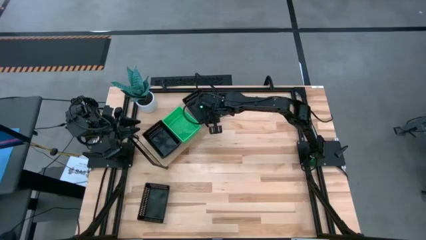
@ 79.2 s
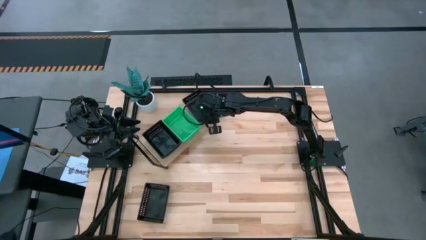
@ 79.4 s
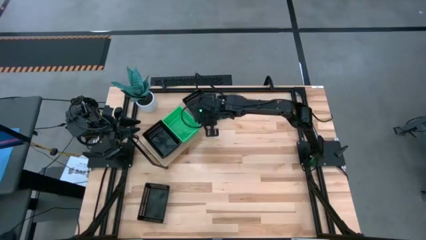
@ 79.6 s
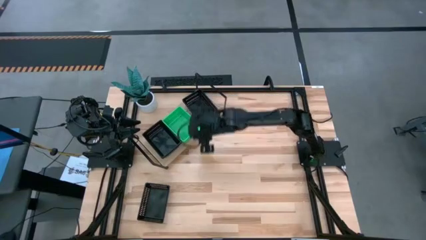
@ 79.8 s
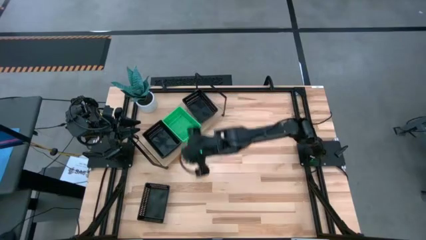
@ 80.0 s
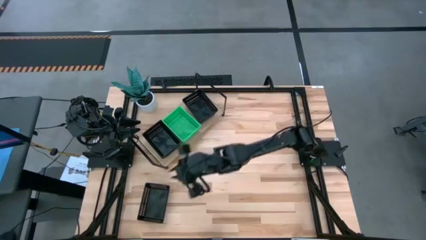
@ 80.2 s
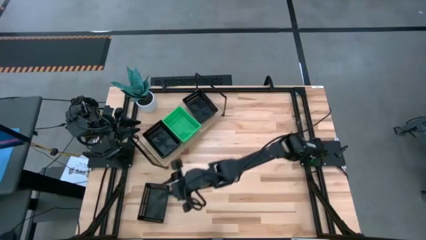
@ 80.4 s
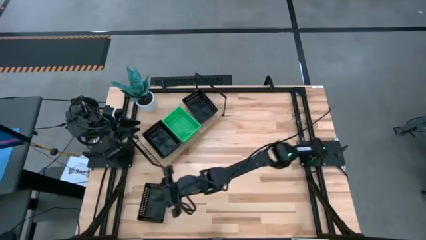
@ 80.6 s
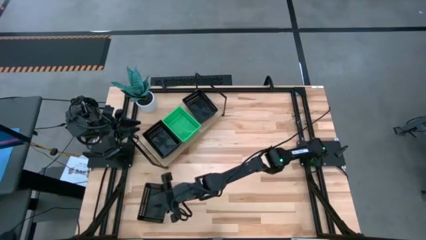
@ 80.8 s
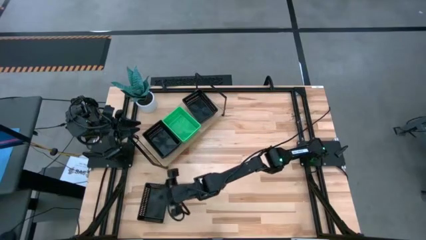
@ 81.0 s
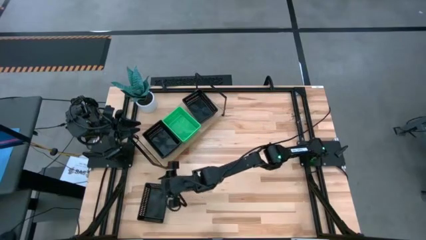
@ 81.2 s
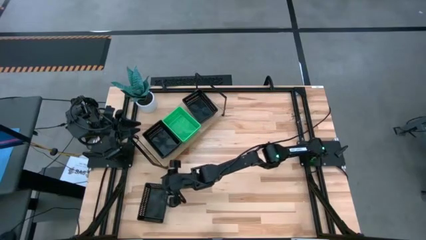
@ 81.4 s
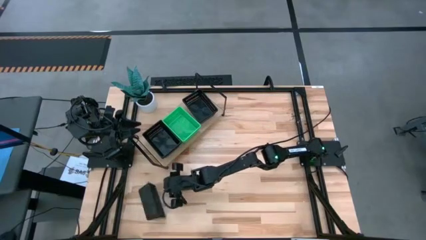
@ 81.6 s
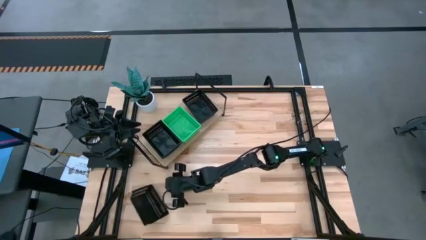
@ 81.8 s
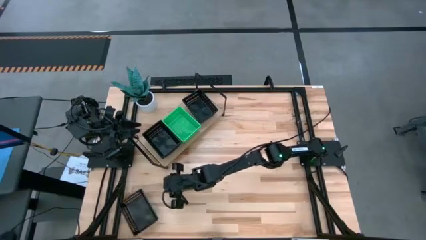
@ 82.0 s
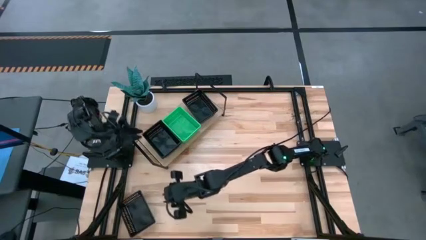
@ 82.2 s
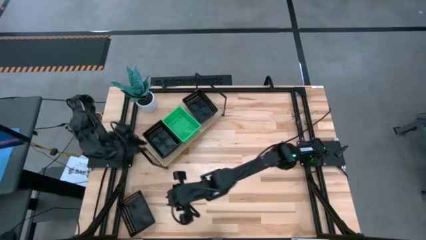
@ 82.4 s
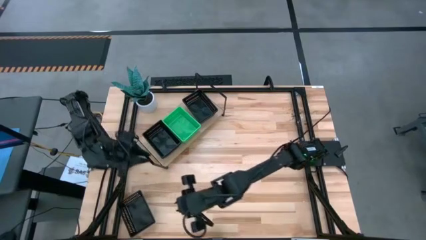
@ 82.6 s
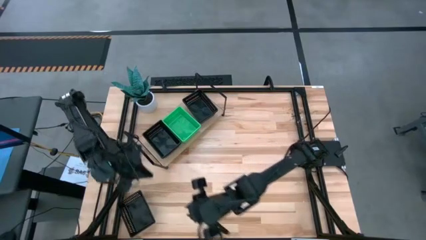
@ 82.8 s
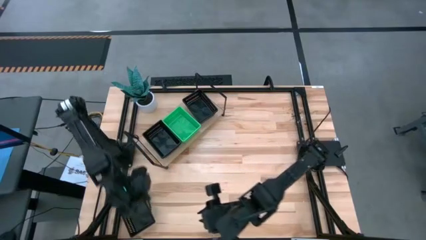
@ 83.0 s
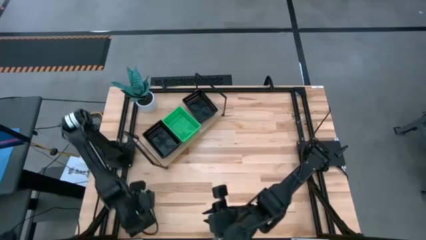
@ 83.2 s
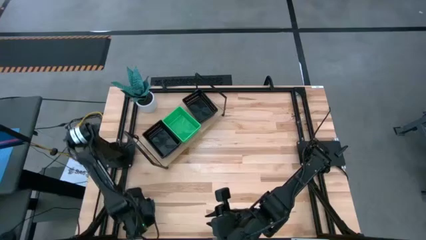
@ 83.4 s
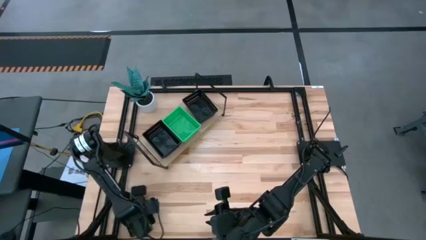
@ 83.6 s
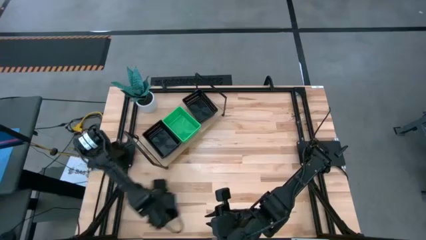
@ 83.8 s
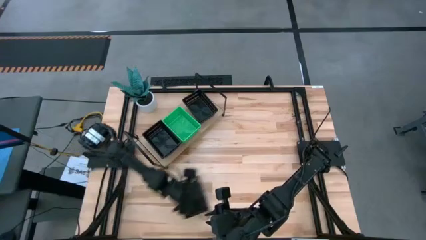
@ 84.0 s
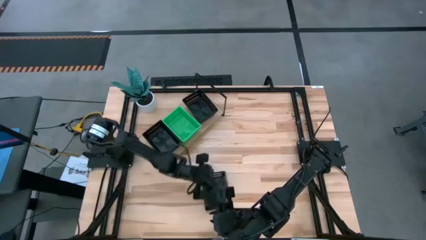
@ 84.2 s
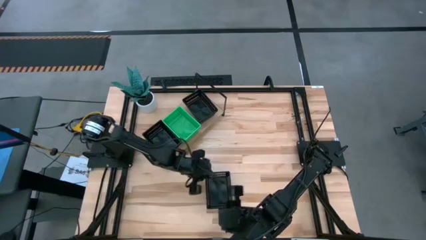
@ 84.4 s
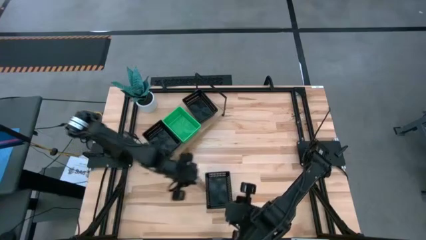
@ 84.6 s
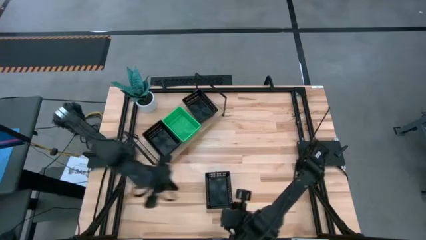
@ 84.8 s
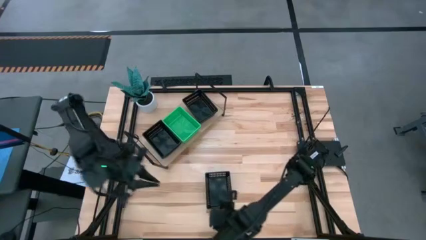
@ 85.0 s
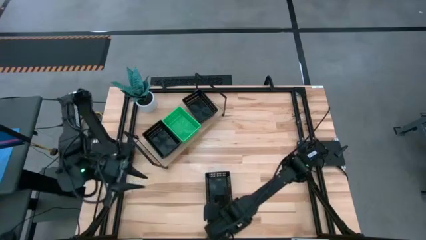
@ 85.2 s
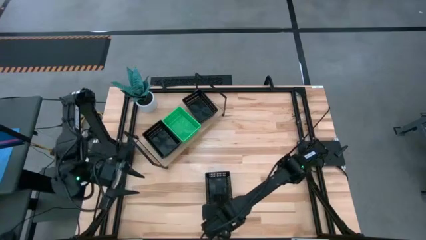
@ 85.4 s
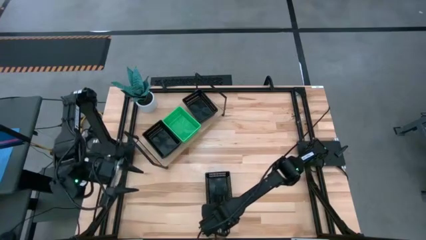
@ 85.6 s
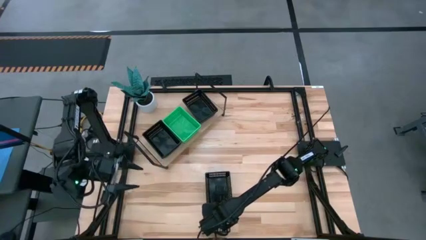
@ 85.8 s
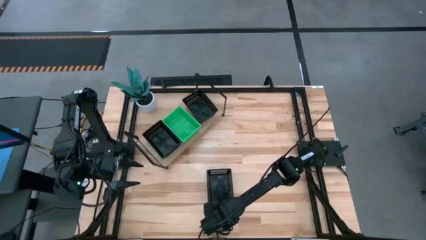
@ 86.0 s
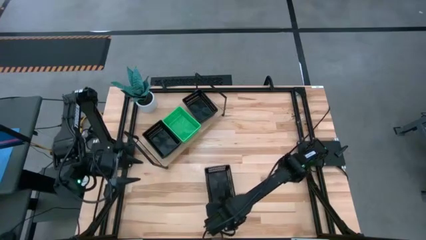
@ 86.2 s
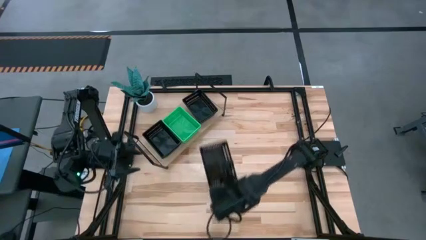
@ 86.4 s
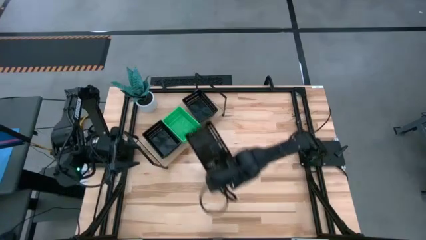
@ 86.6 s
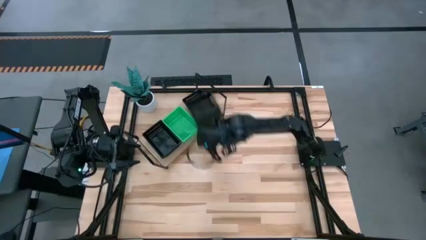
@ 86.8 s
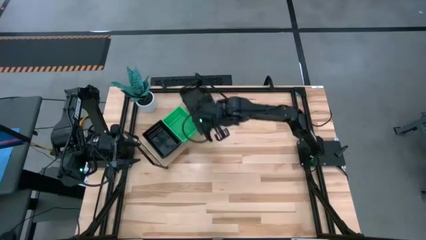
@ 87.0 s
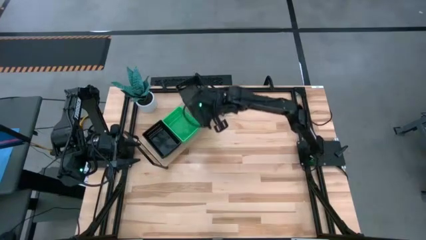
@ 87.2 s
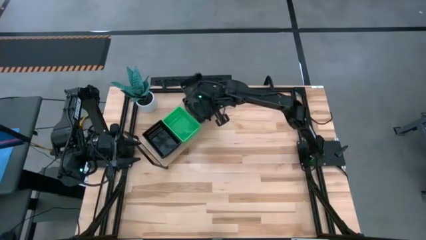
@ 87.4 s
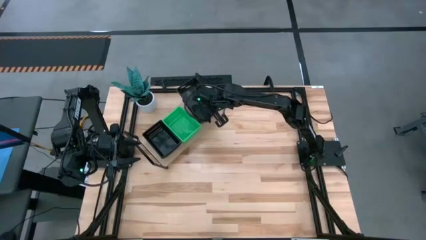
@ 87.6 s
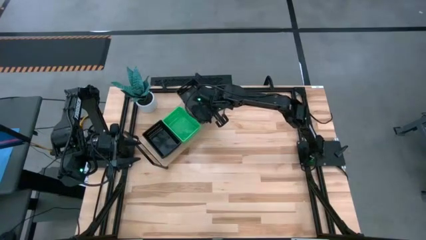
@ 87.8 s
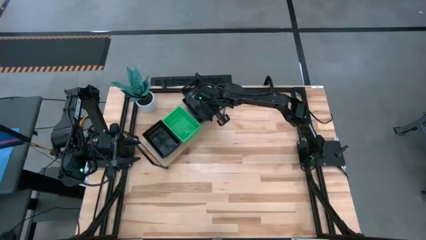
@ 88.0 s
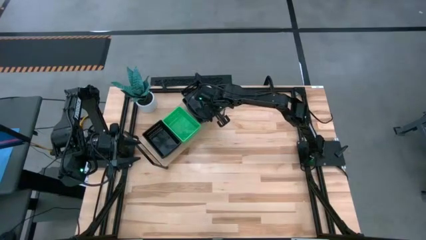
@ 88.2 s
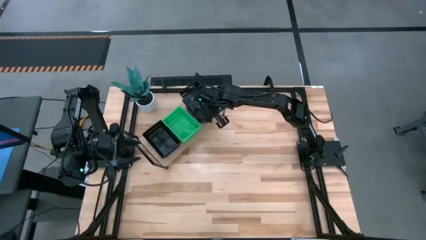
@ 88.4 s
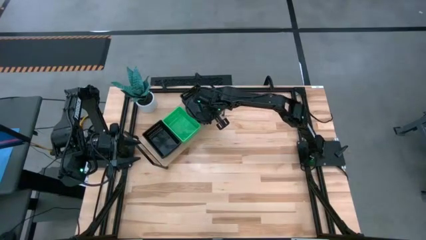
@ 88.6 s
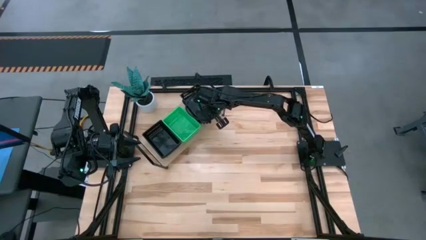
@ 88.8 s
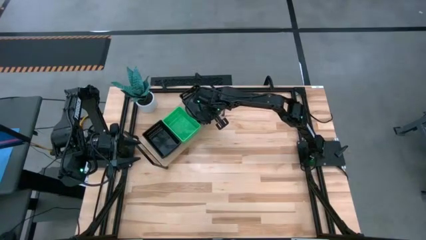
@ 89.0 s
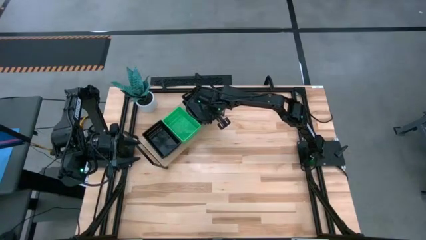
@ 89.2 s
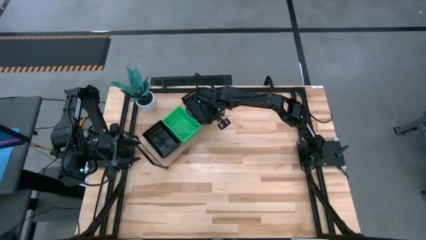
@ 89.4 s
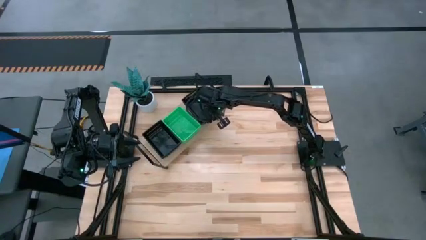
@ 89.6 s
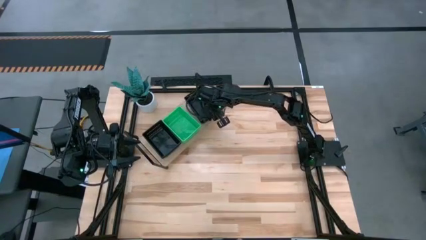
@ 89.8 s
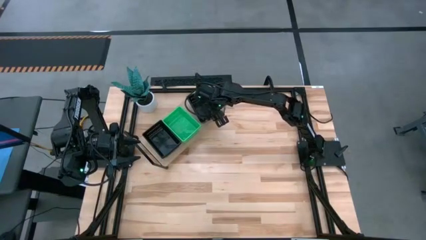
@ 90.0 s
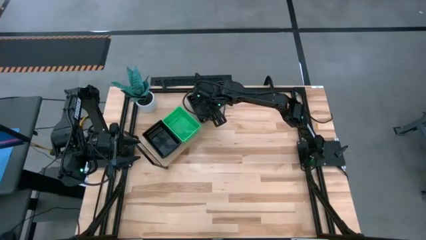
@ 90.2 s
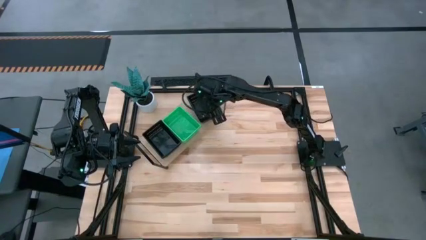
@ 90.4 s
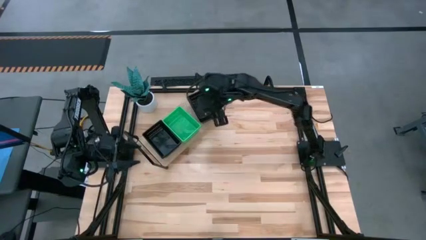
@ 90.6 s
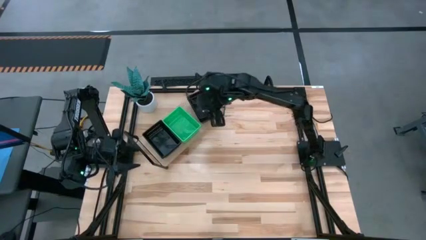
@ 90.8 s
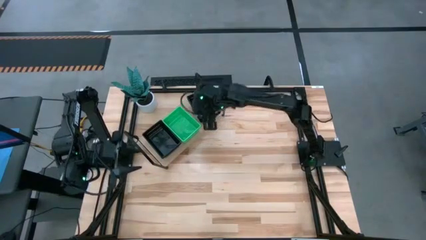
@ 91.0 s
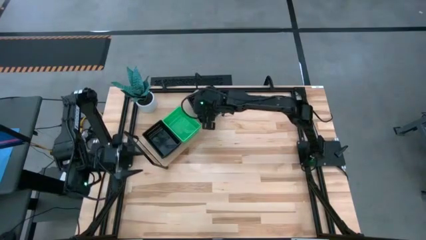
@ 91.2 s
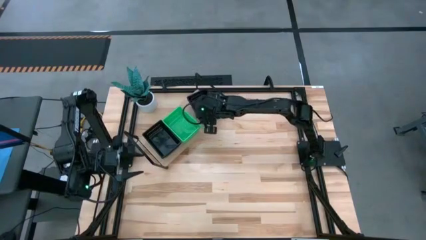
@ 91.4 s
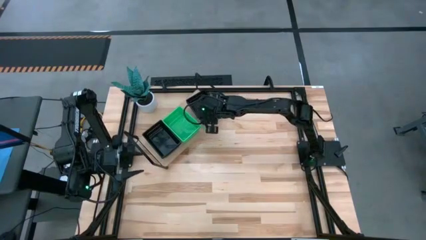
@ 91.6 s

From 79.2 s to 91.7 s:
Task: Stack baskets on shelf by color
Stack the black bin on the top of the right black bins on the shelf

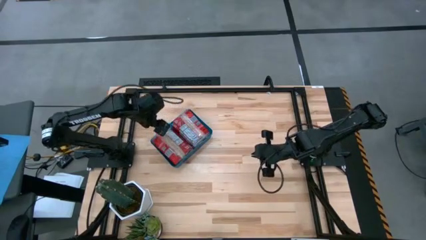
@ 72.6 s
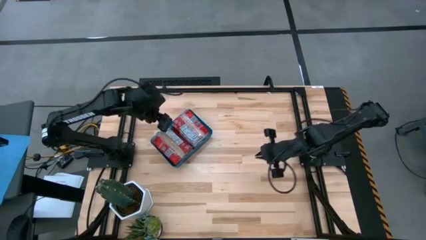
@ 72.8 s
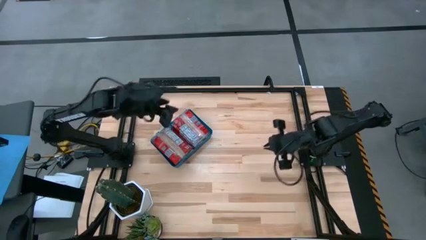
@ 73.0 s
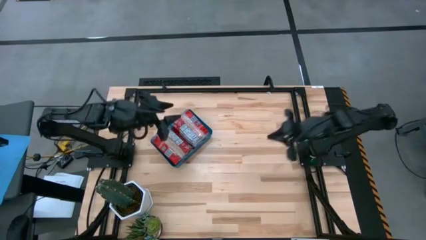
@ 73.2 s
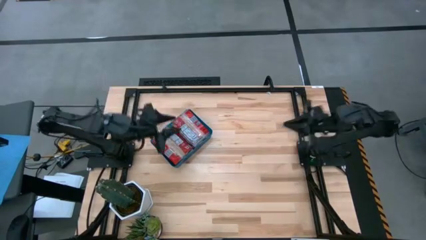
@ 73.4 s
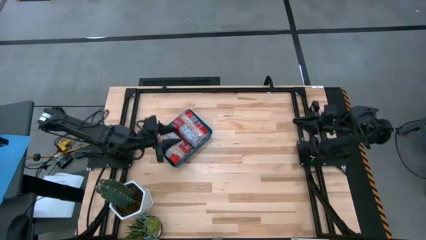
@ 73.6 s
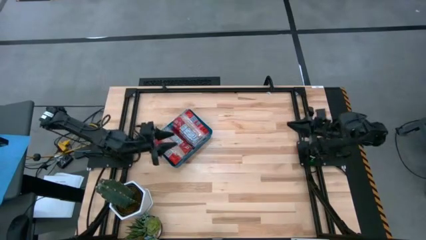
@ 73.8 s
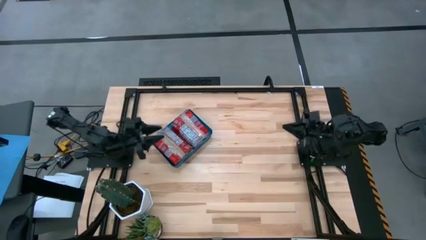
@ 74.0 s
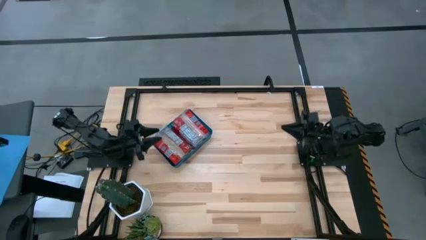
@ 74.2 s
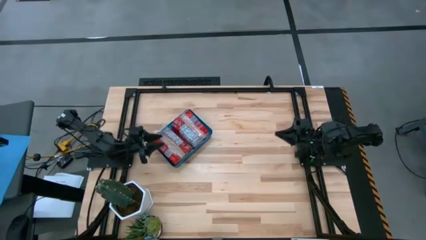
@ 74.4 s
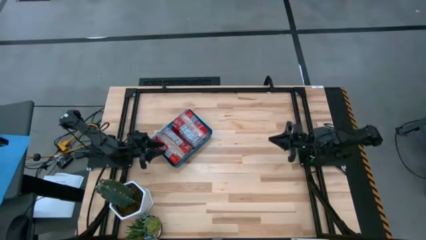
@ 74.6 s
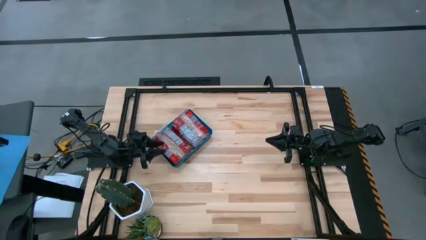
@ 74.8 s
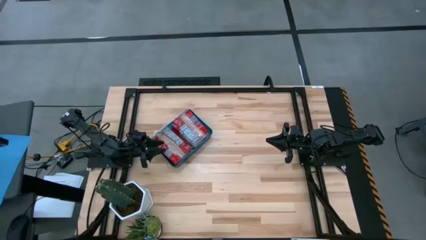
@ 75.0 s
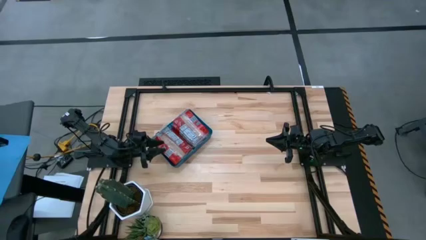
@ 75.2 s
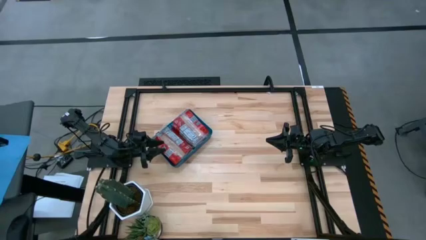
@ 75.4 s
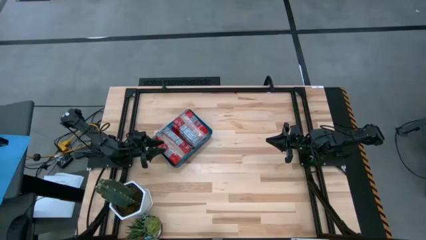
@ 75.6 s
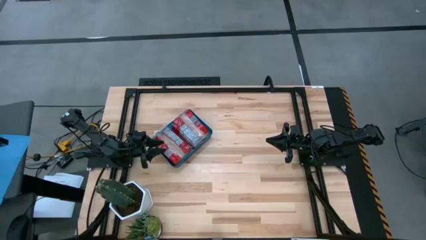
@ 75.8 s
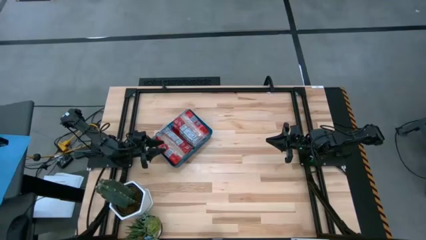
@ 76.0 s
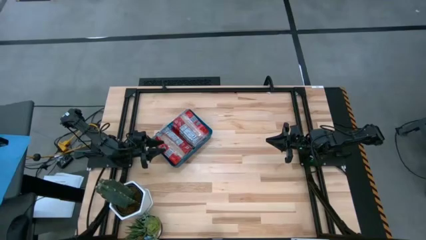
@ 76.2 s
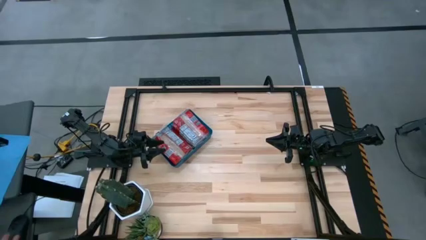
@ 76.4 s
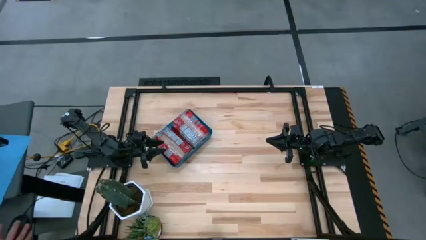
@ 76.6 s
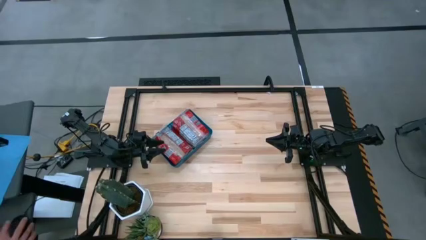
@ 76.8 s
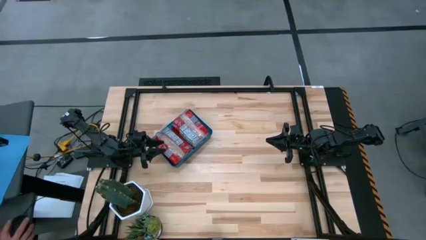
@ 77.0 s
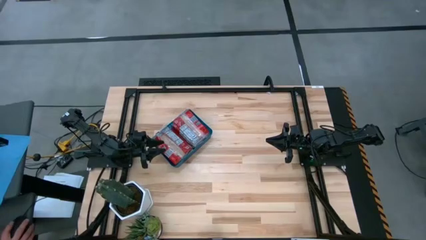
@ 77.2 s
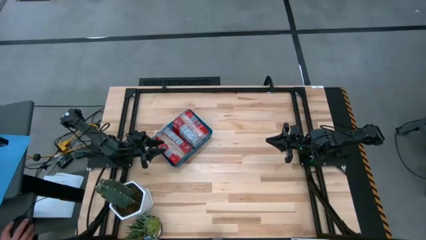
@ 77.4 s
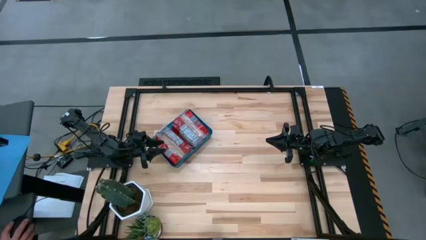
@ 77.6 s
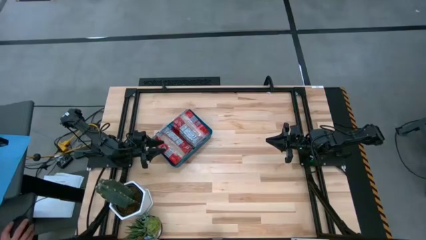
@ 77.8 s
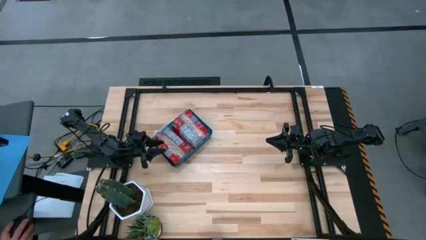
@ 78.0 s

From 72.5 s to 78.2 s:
Task: Sort popcorn bags into baskets
Return to Home Position
